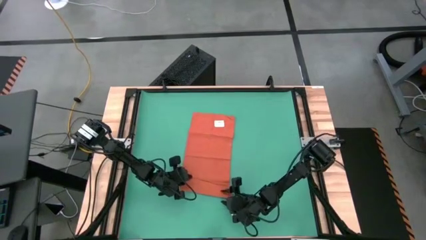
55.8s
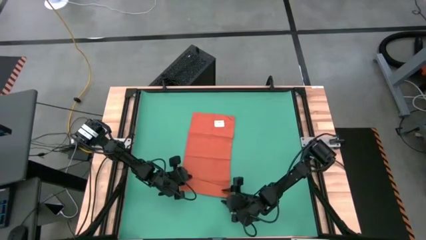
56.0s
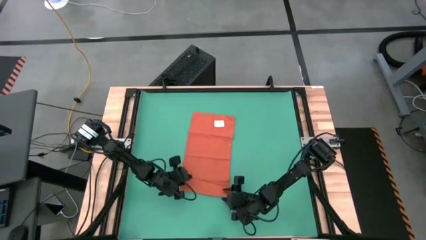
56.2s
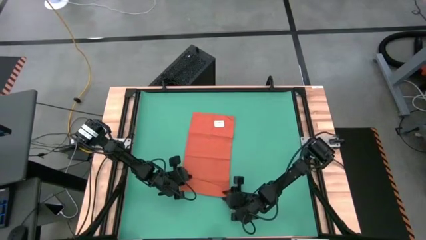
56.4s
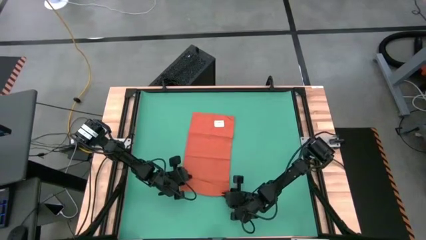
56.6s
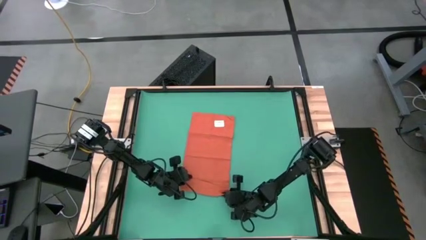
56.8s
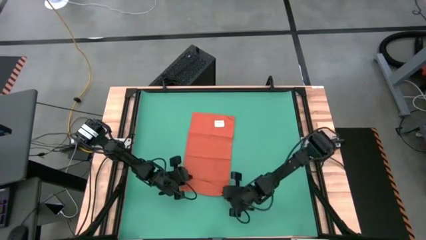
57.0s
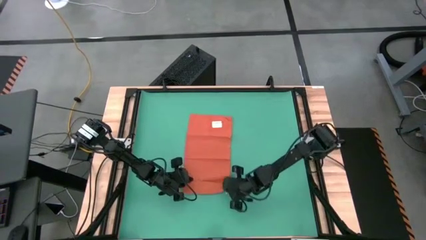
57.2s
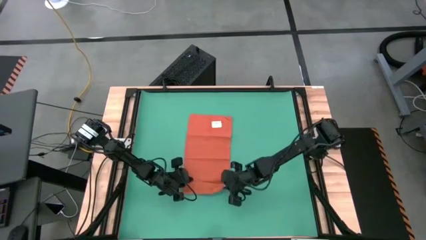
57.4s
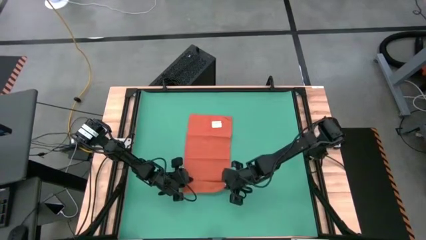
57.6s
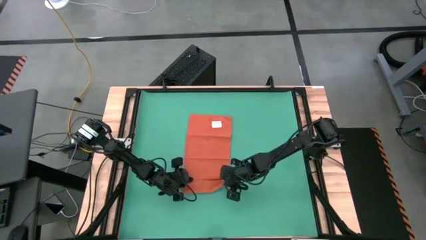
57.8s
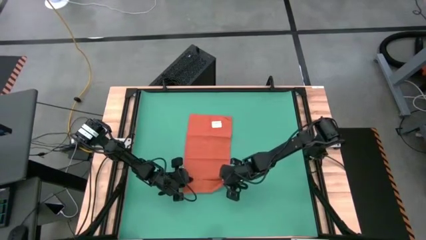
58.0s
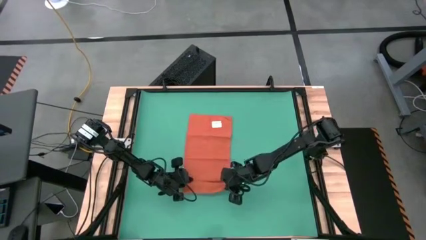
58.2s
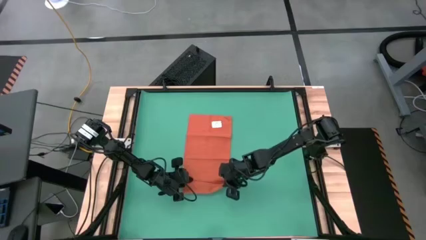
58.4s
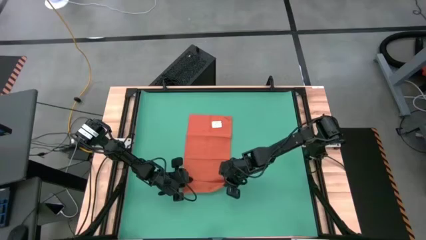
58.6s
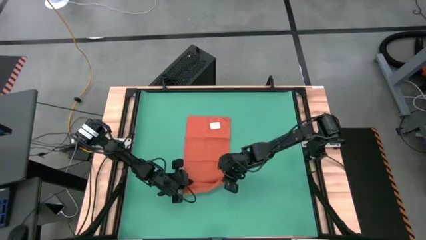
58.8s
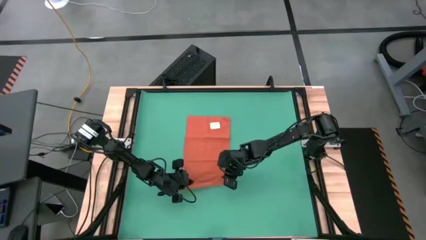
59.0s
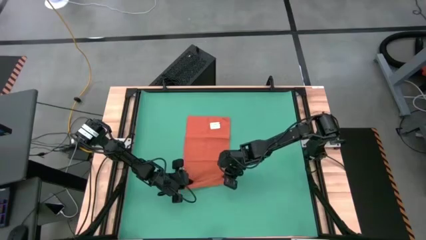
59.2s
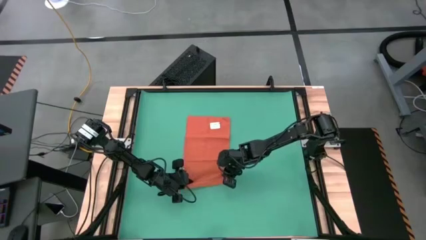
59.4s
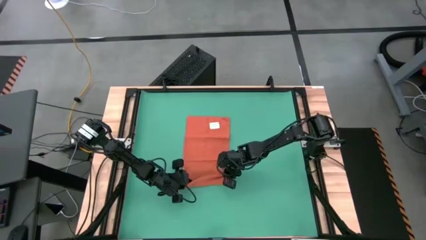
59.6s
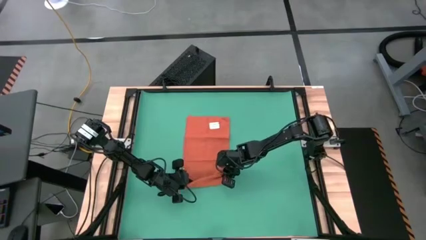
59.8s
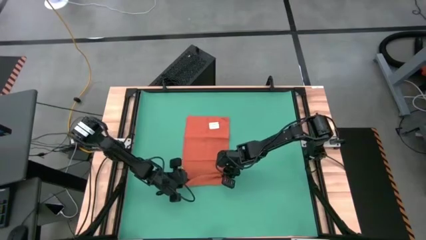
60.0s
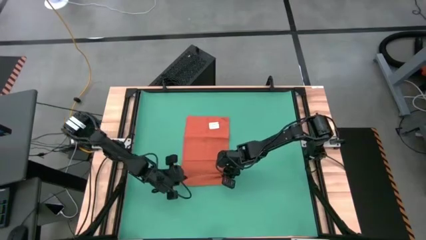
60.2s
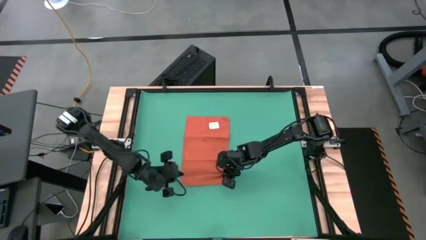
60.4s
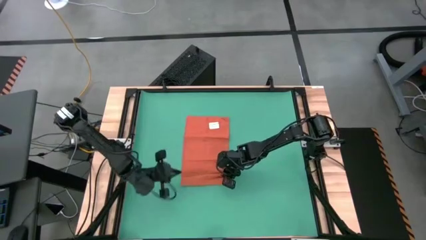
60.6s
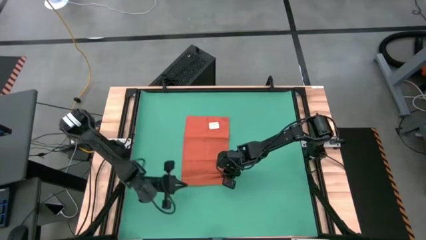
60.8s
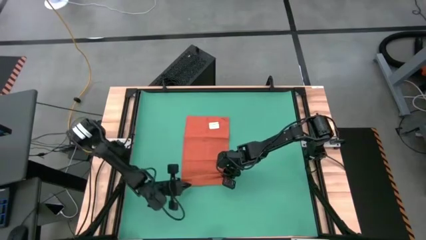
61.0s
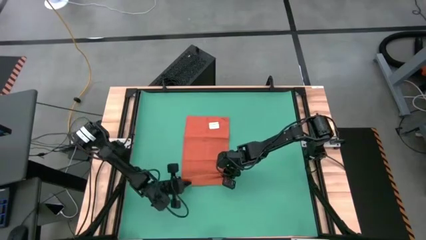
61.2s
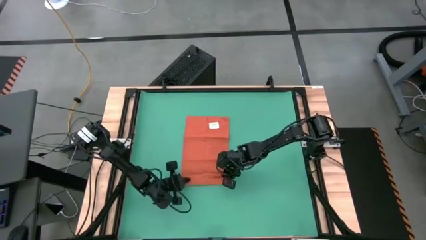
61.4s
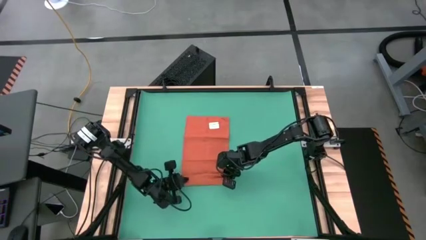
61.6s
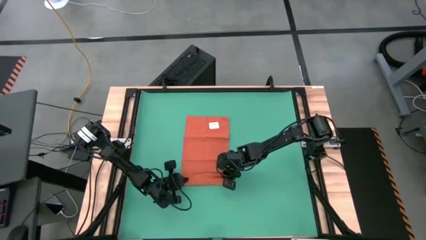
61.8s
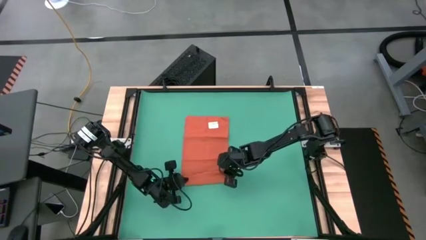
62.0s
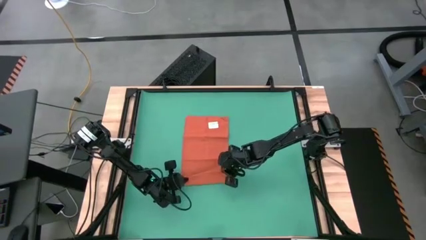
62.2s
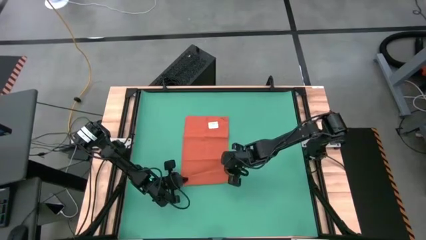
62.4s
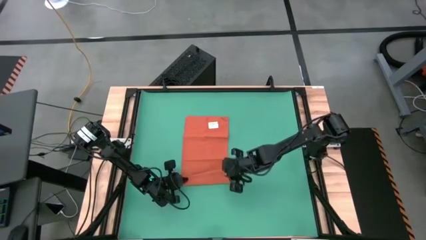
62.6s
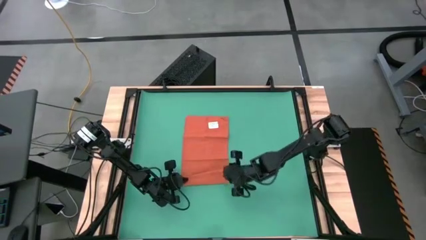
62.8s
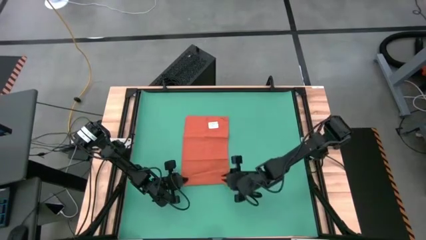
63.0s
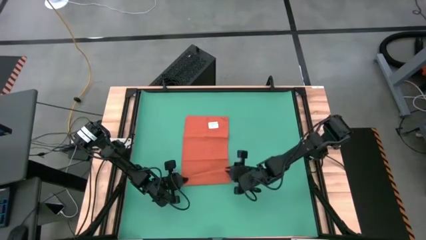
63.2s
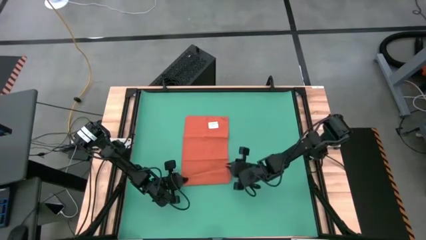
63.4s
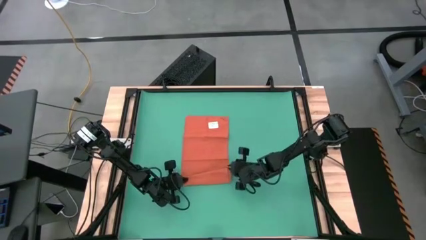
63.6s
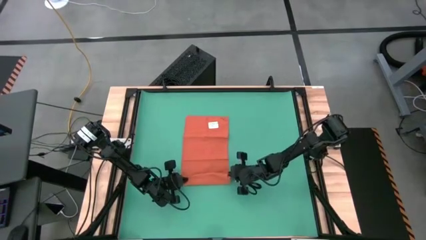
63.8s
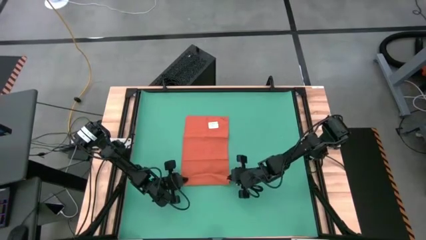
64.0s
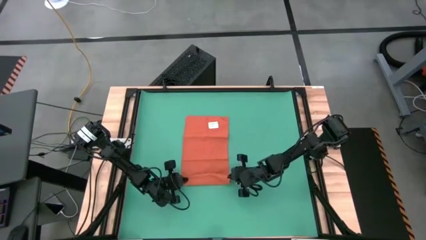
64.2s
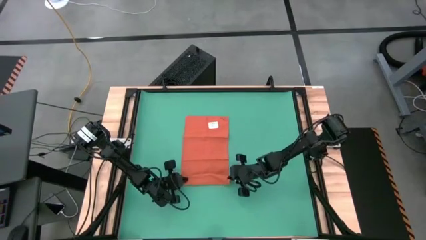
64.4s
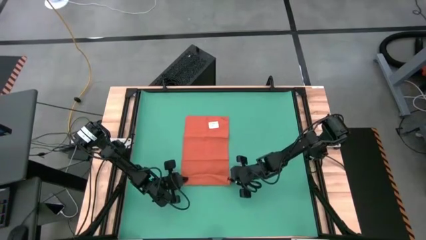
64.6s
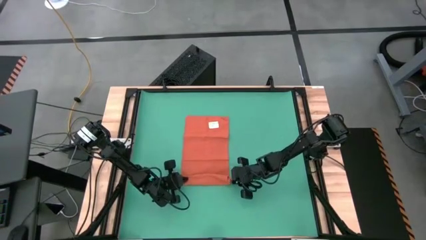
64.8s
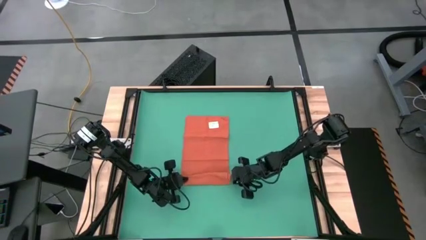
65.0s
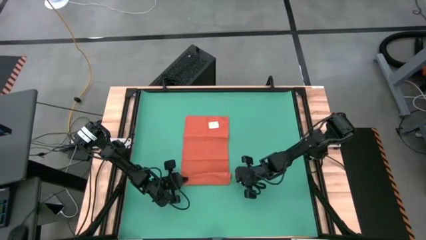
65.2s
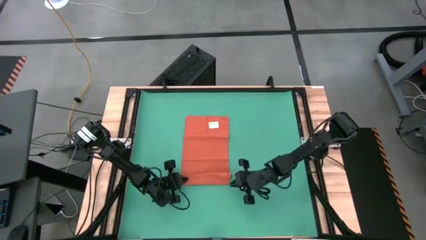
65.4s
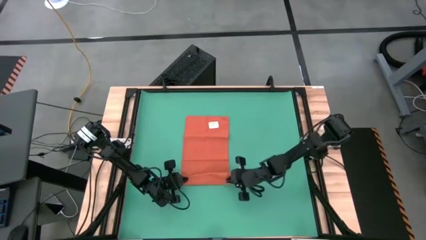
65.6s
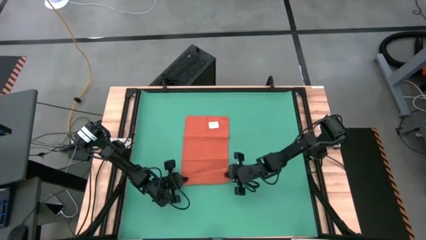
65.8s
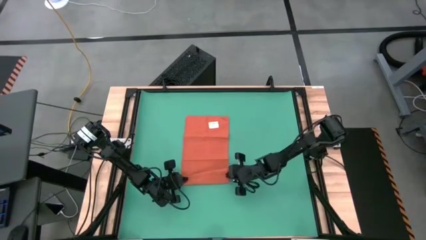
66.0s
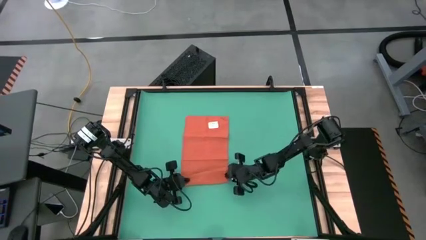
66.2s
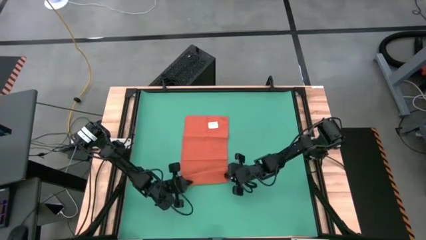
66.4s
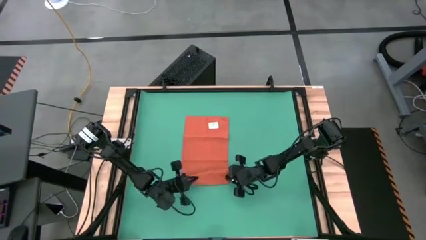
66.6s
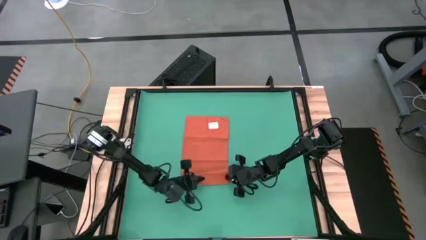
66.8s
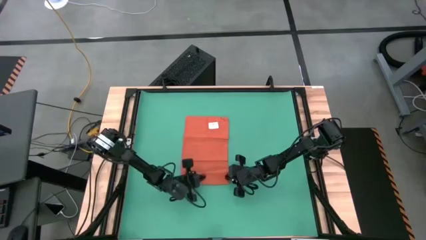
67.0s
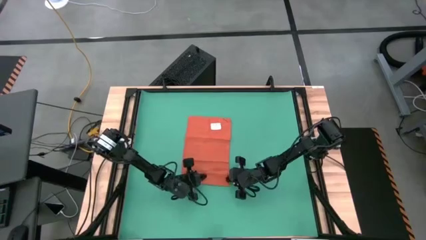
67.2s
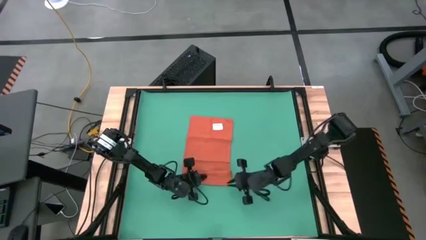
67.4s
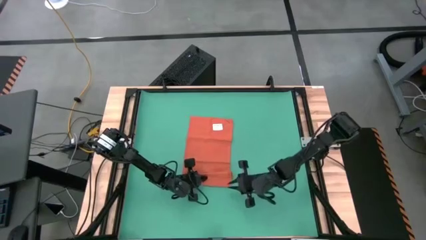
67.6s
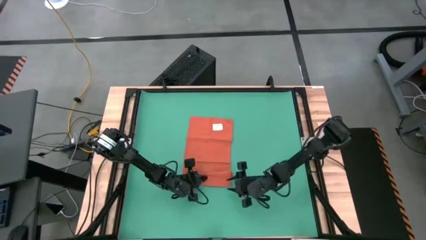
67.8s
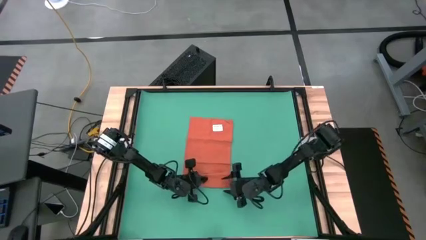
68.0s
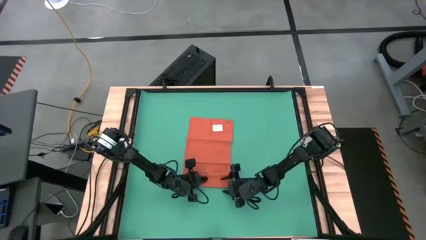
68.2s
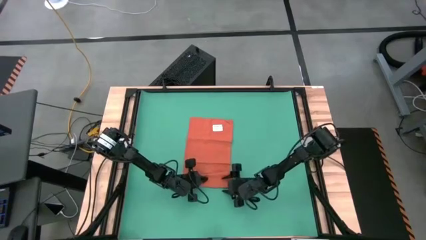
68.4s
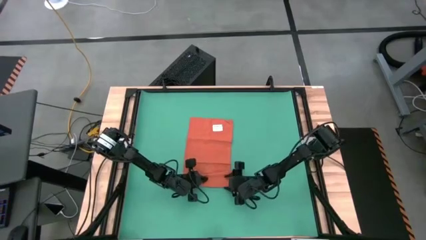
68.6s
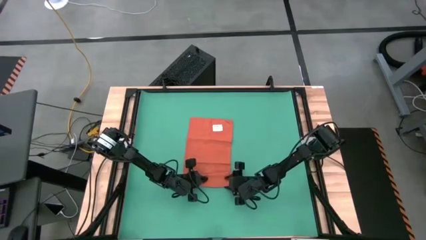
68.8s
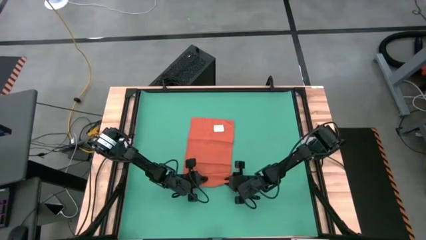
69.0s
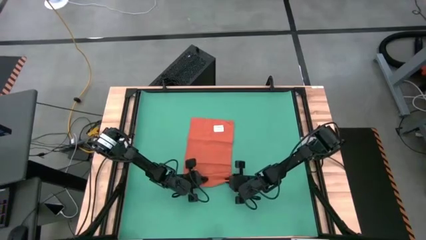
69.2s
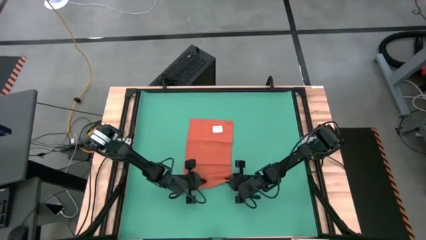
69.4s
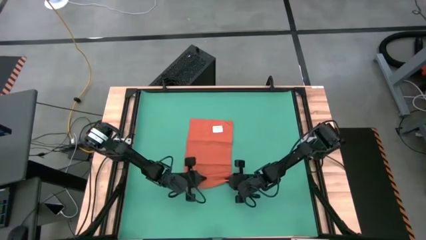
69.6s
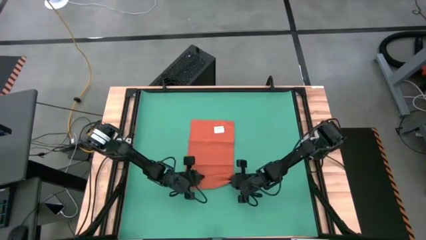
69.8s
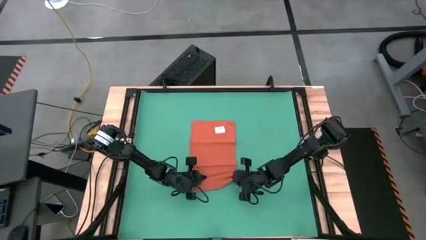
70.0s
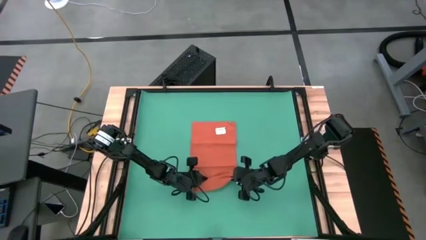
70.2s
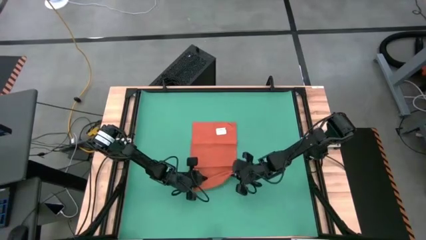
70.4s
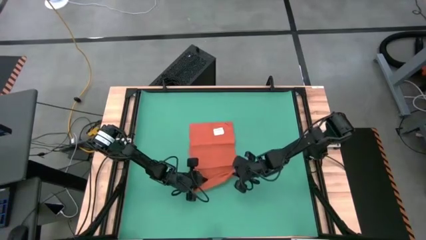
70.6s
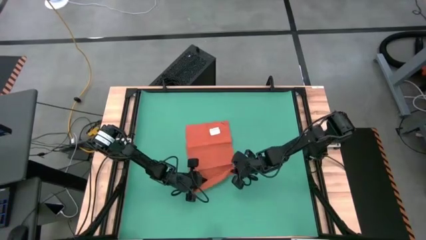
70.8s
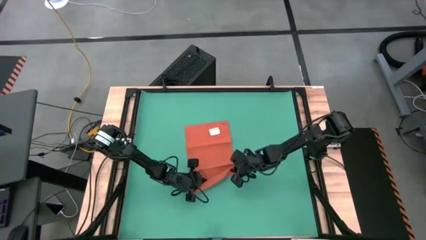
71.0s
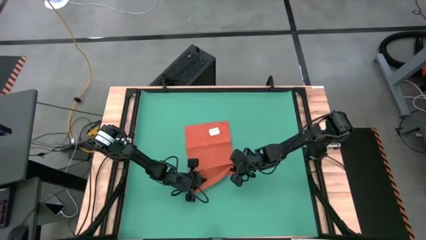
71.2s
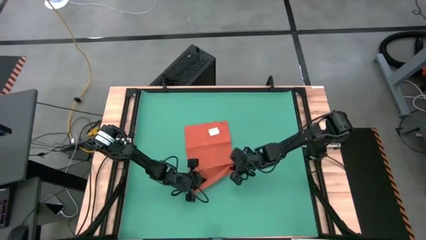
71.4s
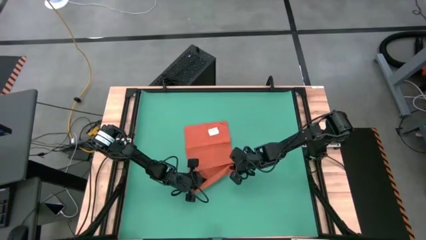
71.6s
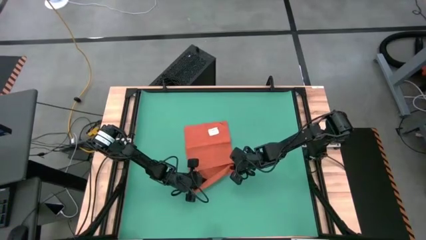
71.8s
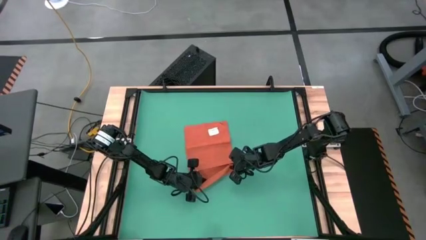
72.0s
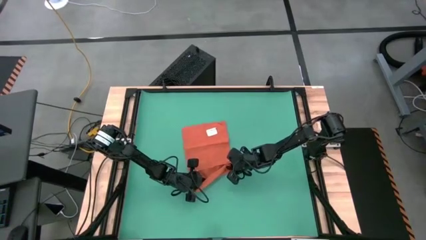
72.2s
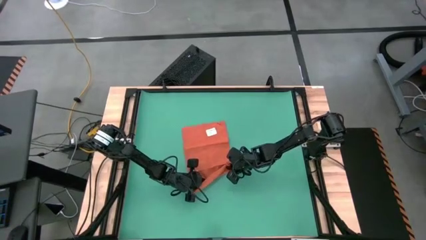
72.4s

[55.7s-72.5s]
Task: Roll towel
Roll the orange towel
